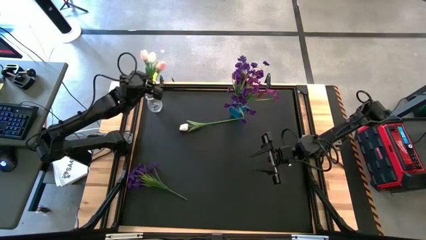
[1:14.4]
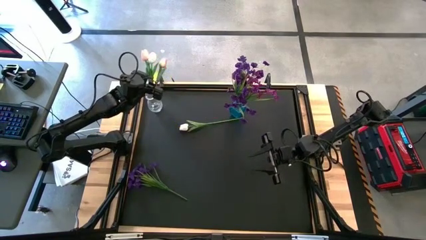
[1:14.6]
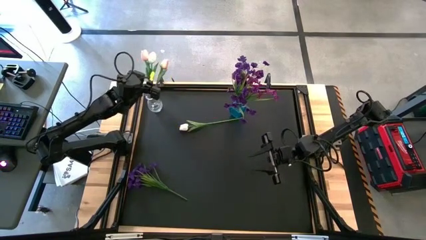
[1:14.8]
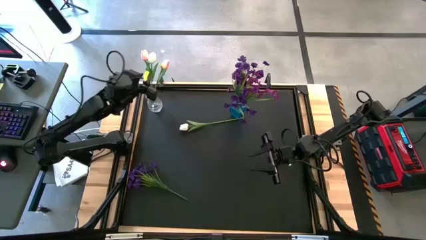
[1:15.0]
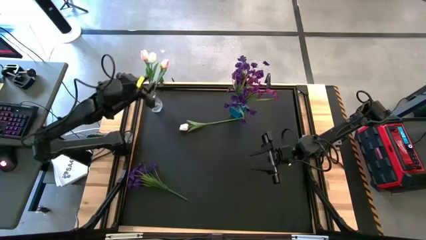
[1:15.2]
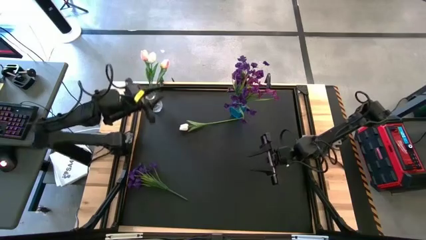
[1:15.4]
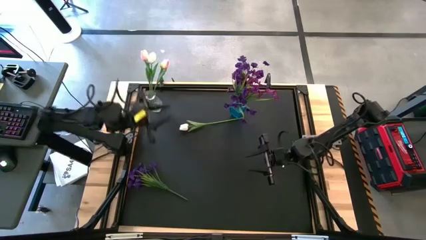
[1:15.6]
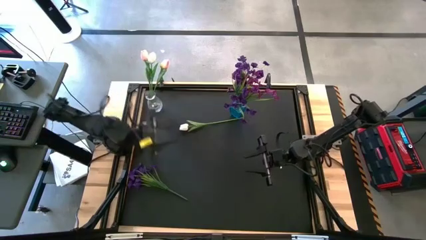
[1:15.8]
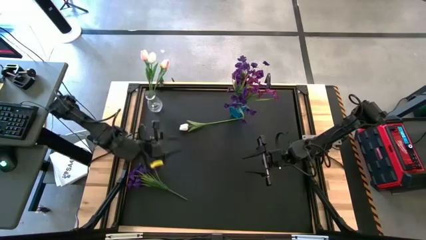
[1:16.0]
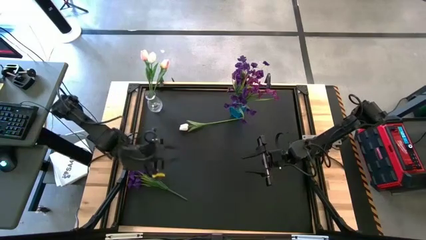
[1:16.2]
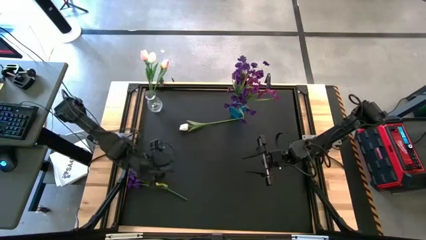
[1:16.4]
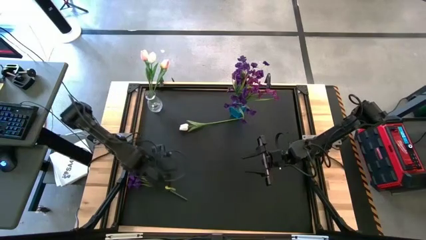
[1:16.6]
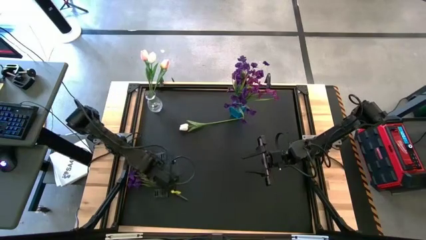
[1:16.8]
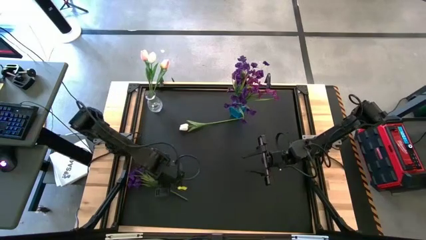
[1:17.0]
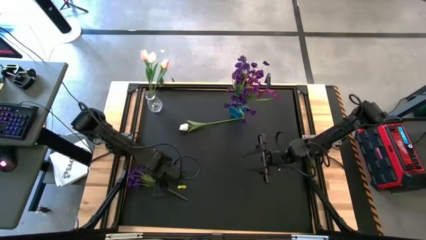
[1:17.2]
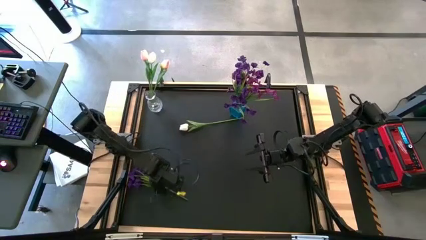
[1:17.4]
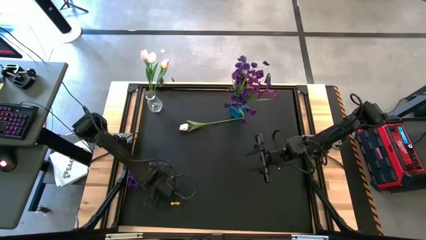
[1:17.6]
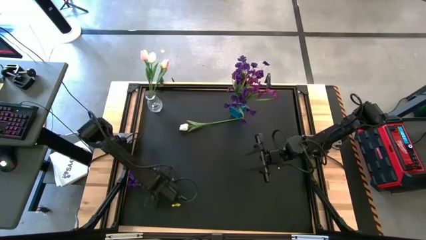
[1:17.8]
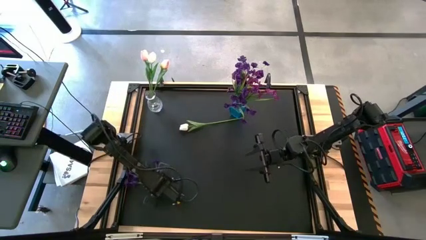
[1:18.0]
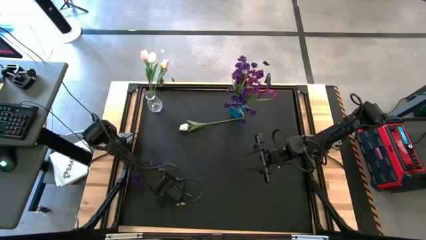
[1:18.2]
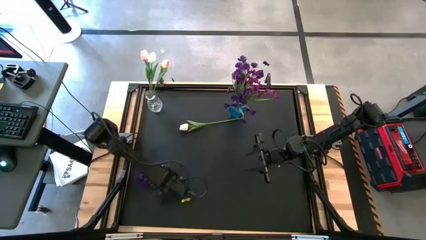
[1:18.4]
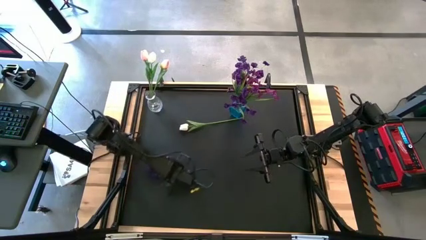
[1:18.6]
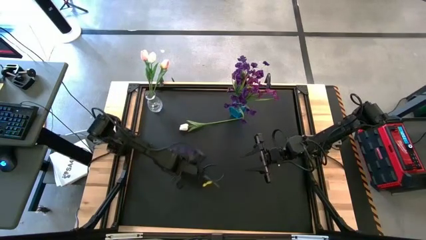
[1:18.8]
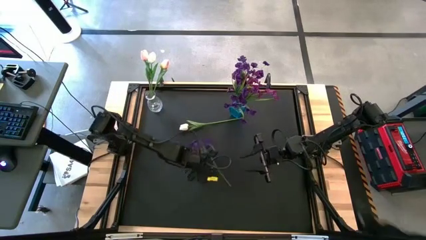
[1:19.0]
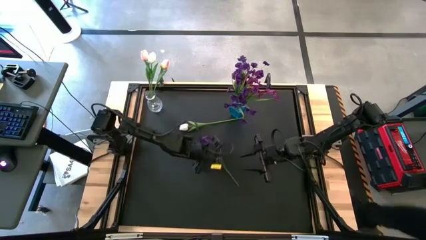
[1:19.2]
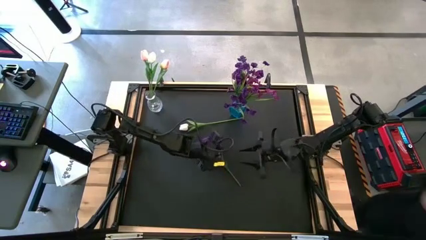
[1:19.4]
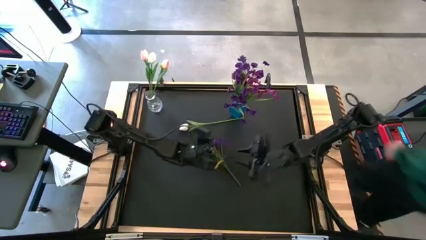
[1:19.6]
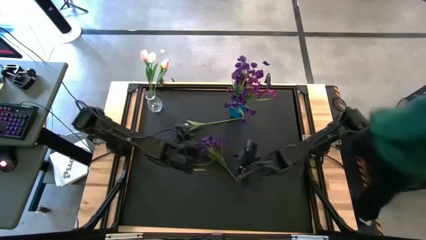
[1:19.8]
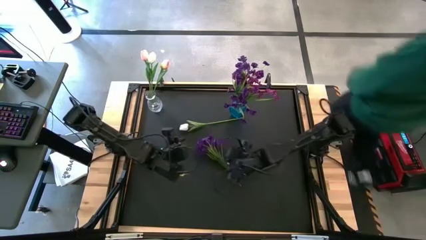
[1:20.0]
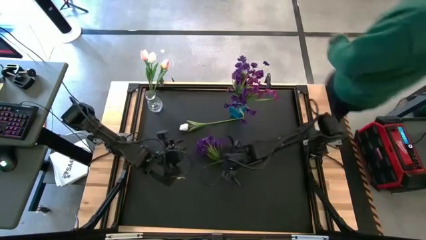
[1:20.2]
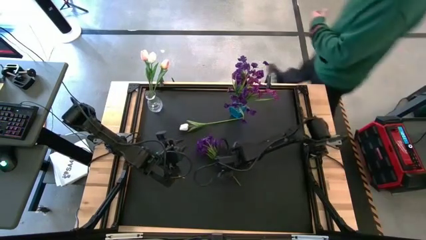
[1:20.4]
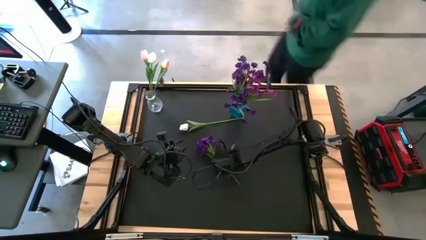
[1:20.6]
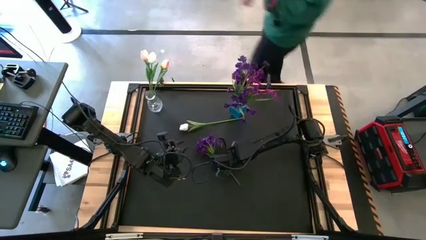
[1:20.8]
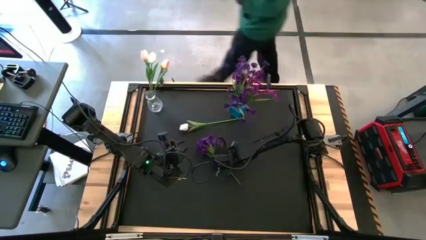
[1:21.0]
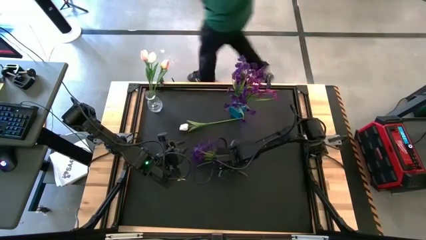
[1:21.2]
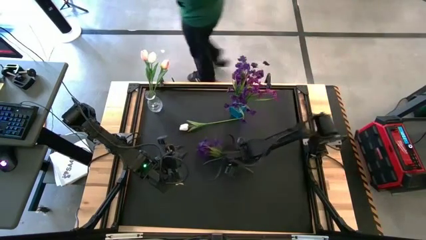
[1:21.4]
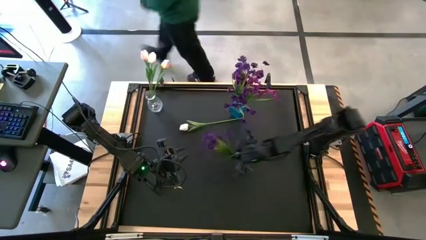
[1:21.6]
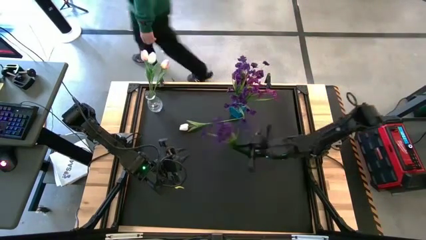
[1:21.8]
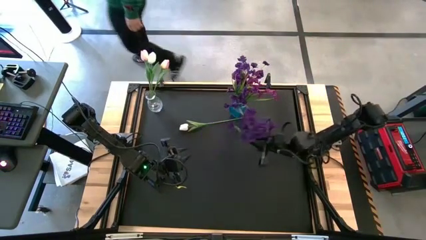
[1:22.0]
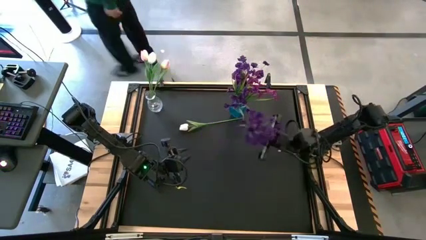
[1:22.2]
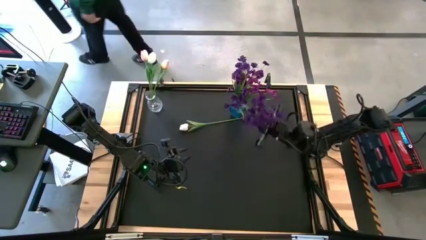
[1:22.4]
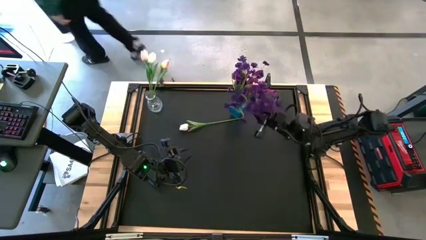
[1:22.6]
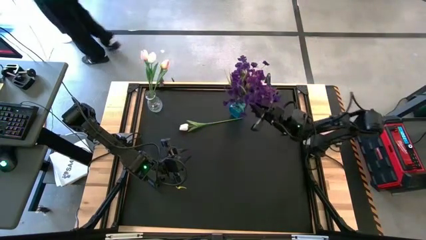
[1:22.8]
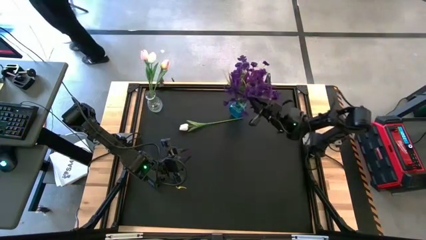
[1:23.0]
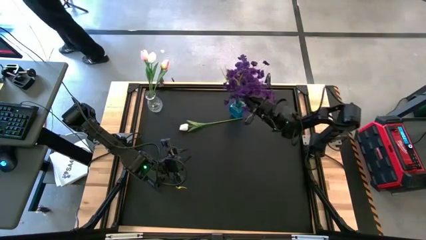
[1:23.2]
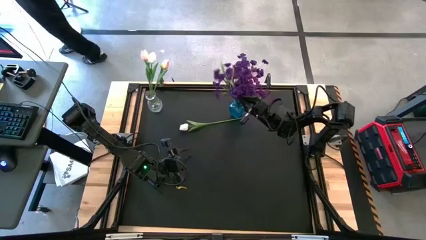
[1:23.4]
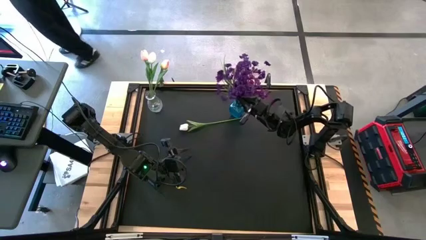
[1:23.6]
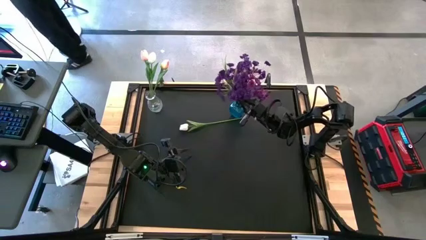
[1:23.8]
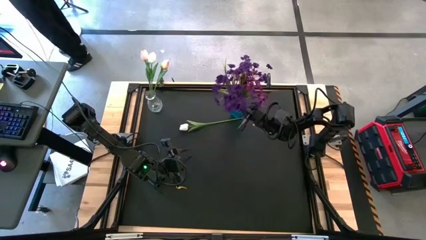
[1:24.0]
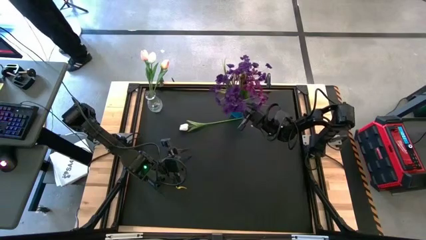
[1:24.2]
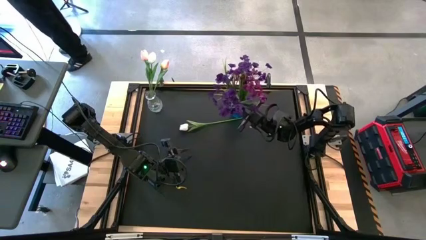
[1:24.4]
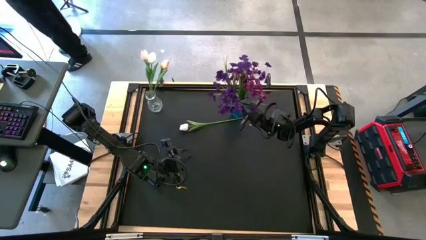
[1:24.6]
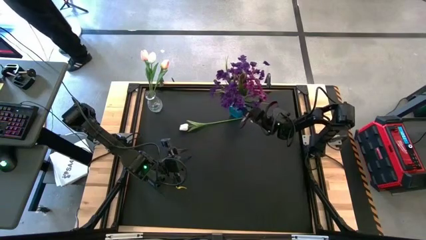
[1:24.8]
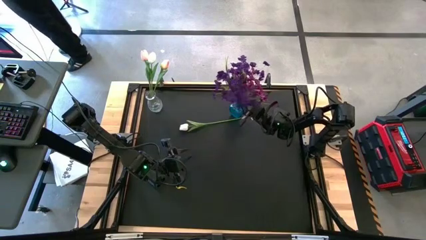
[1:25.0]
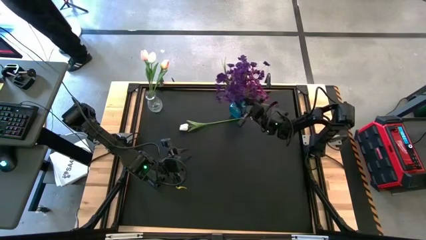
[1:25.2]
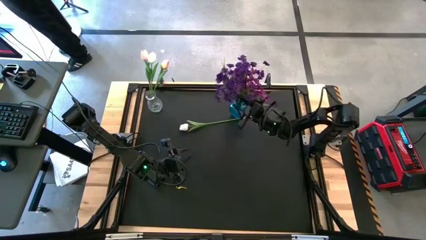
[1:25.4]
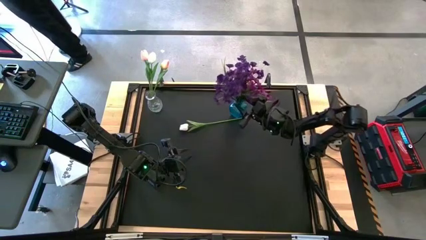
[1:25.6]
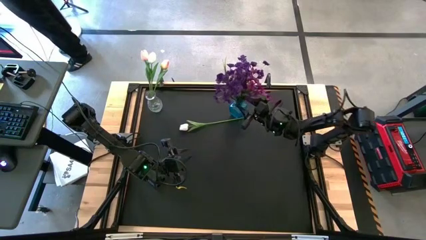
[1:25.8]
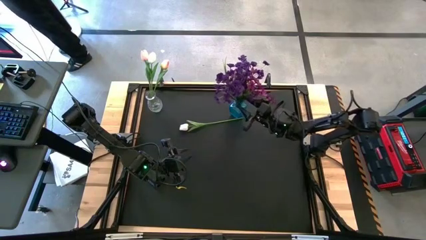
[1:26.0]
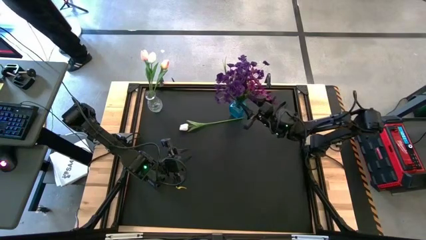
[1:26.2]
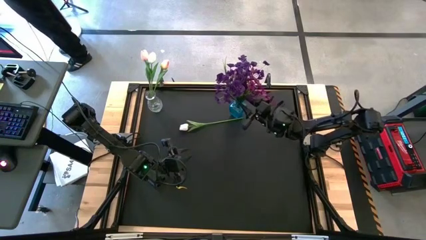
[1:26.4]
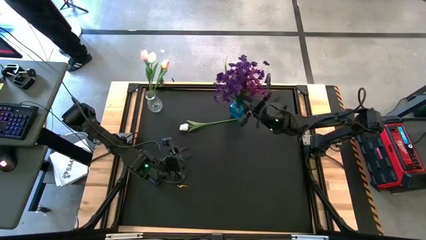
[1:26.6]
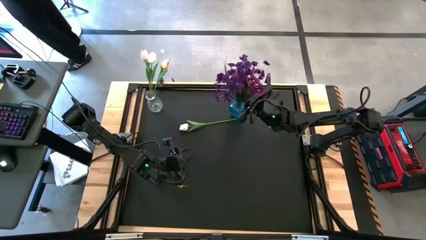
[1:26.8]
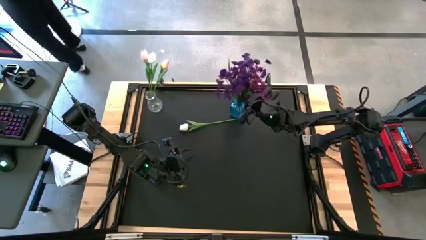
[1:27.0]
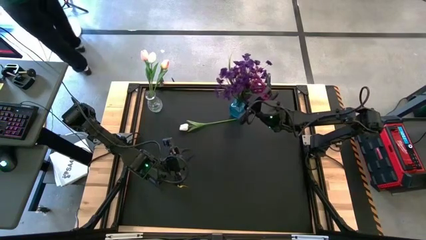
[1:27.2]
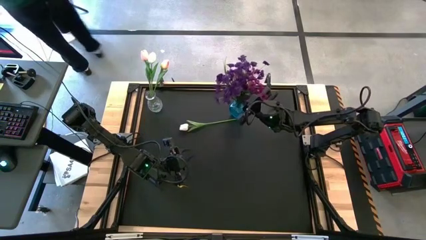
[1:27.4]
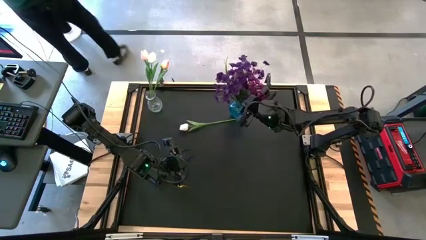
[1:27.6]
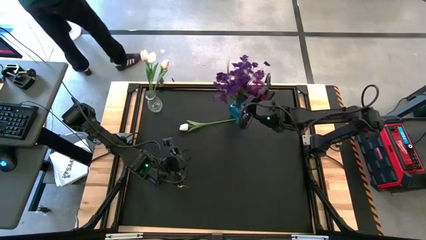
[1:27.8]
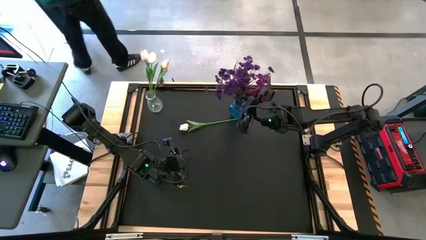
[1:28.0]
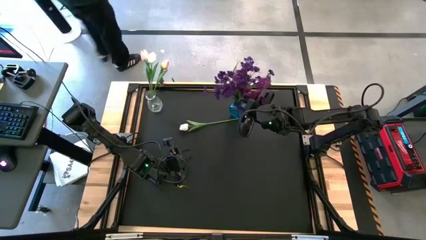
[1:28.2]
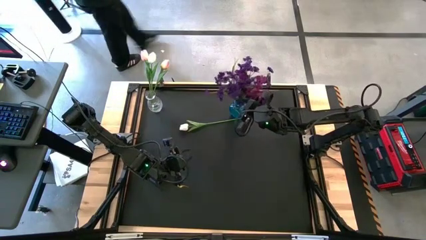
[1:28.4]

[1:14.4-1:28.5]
Task: Sort flowers into vase by color
Put the violet flower into the blue vase
